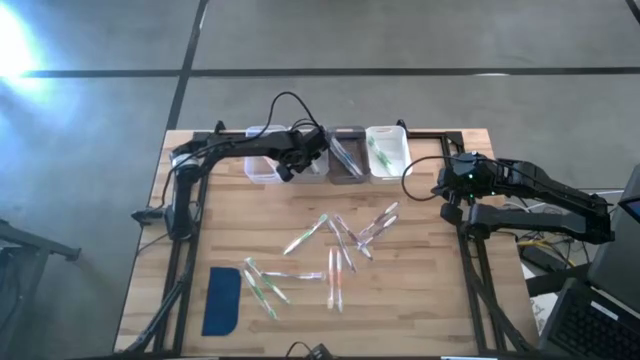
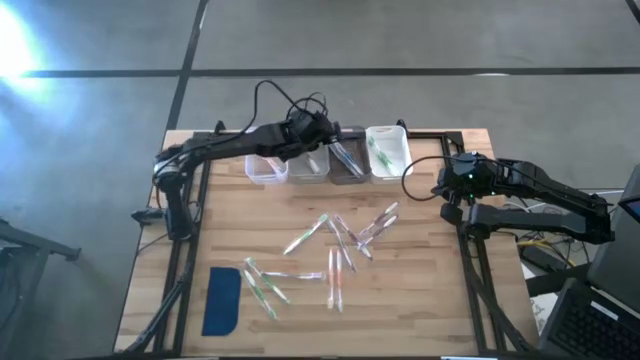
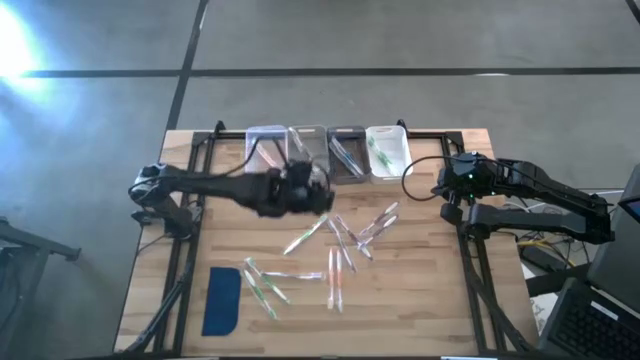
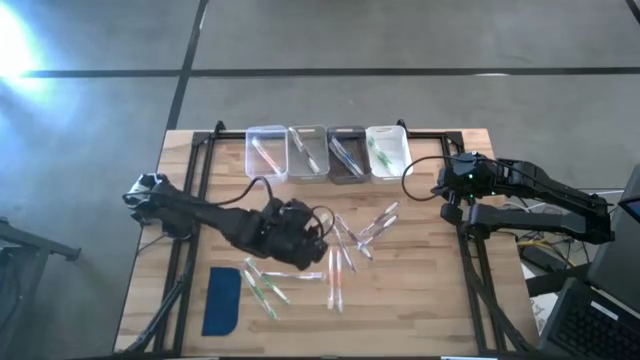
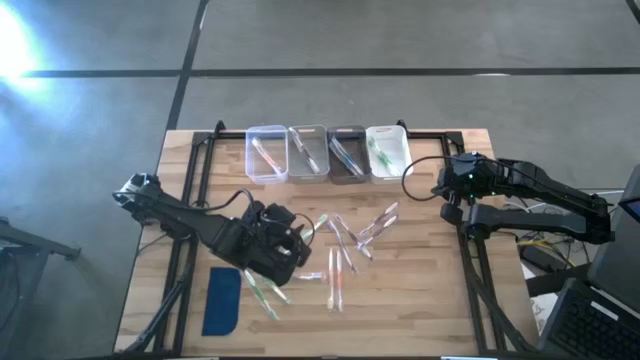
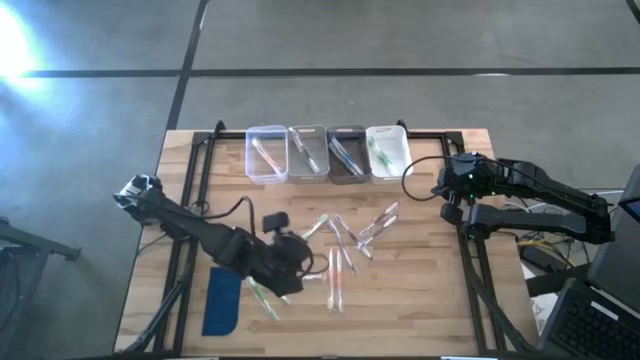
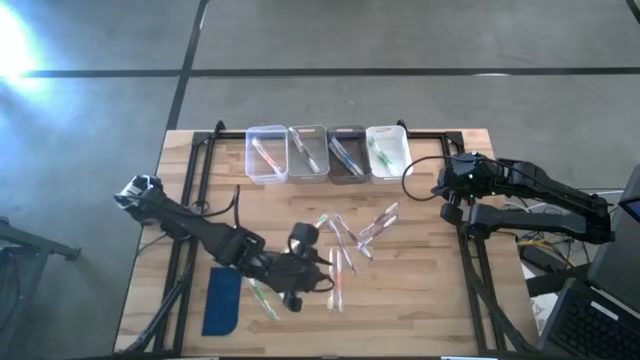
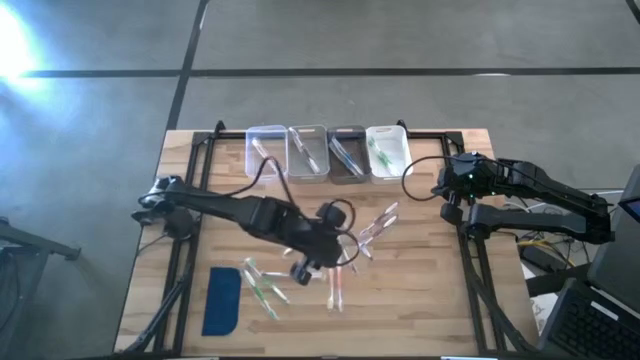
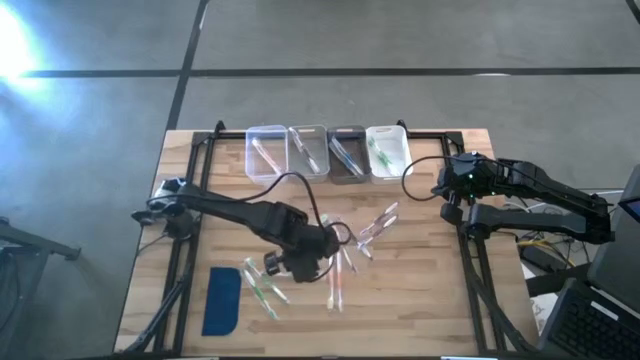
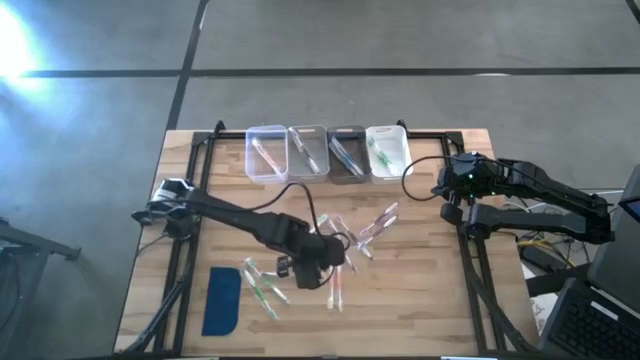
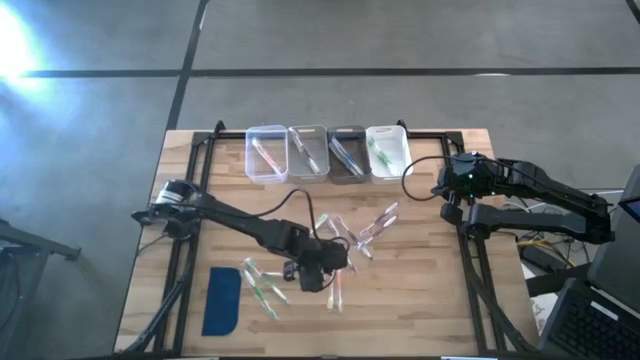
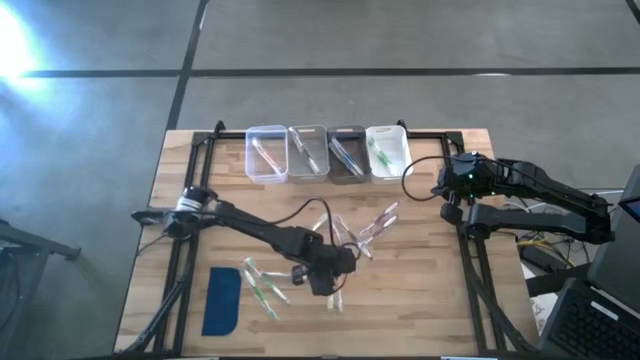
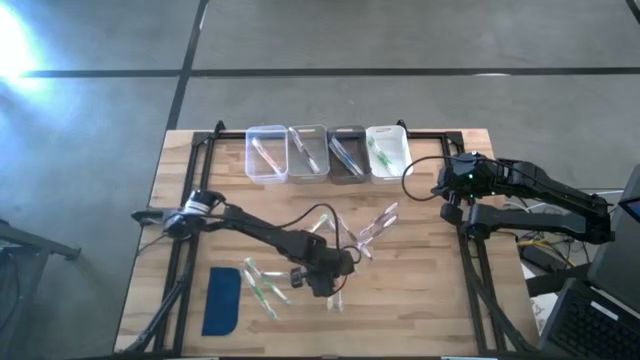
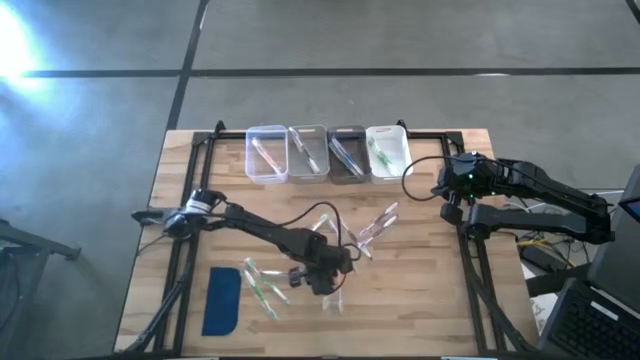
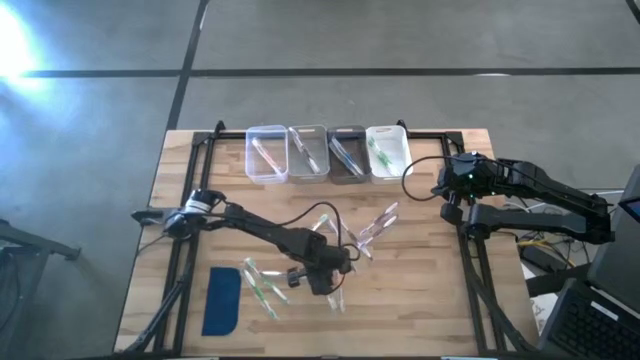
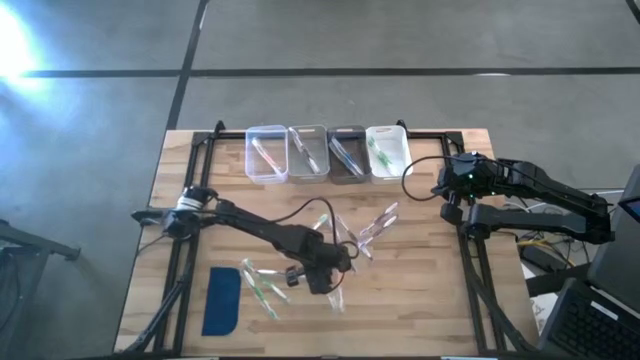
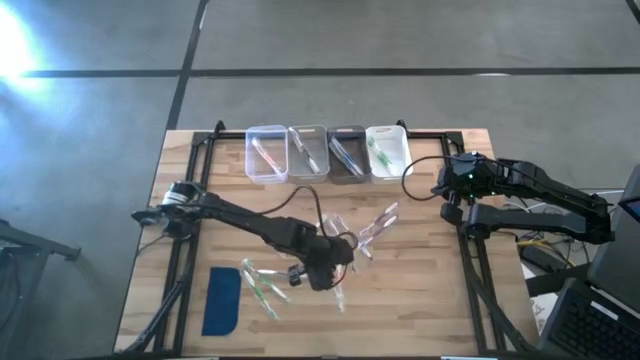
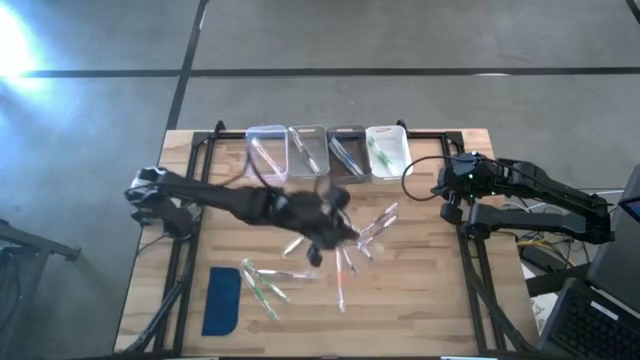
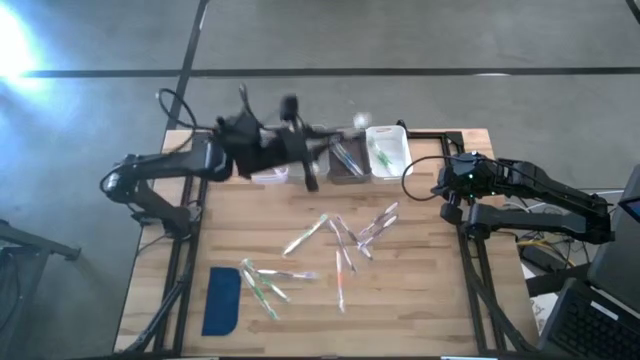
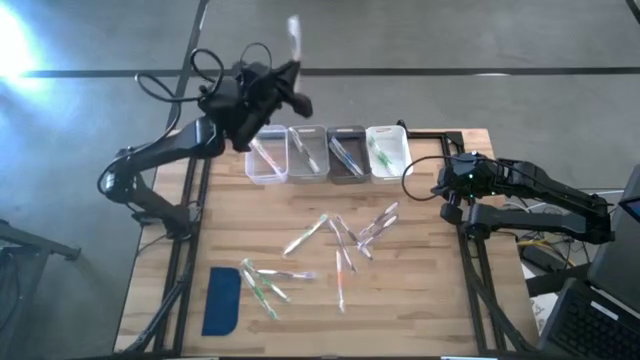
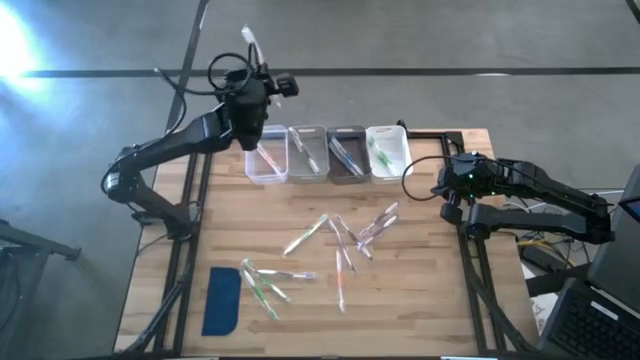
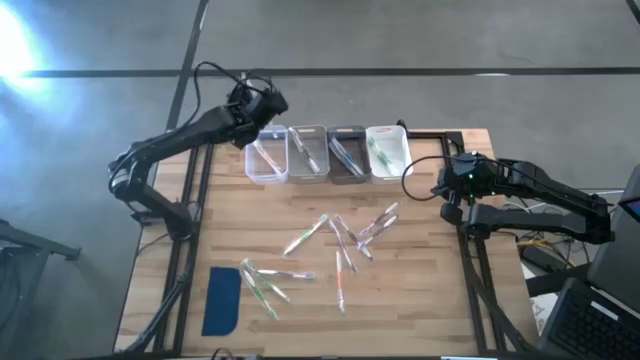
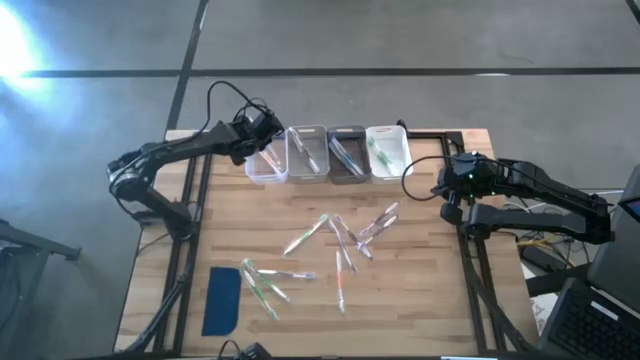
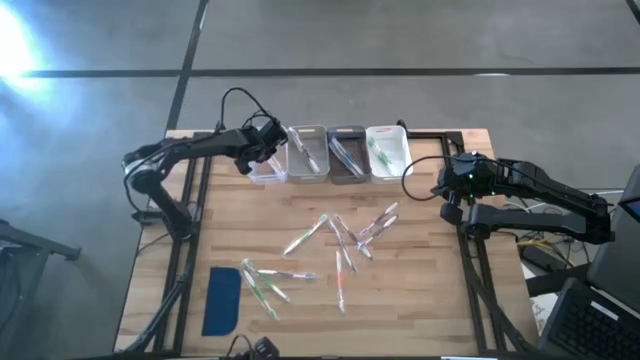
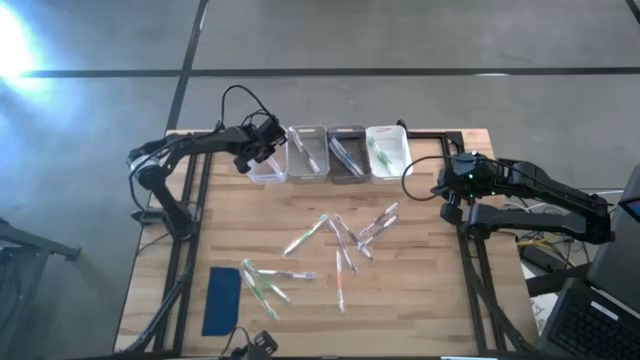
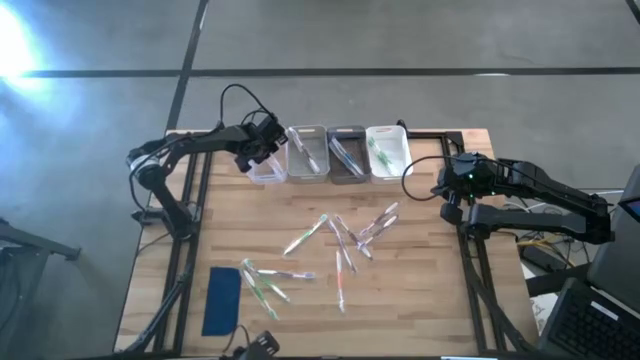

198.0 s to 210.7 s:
Task: Pick & Place Toothbrushes
Put the orange toothbrush into the white transparent bin

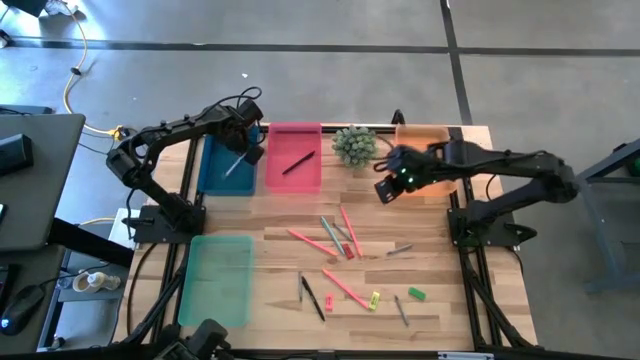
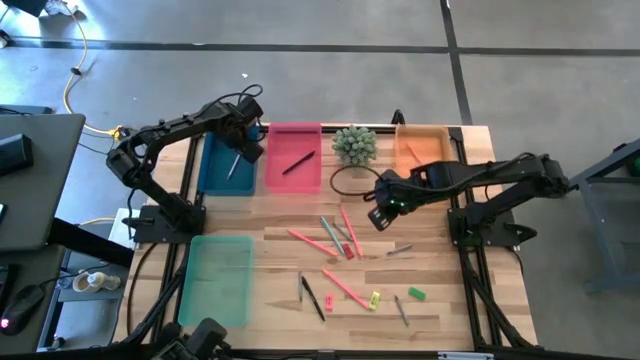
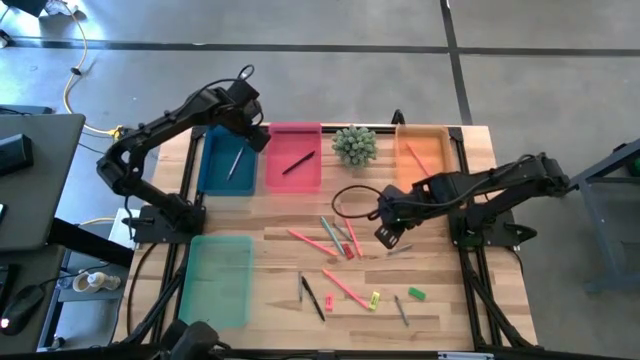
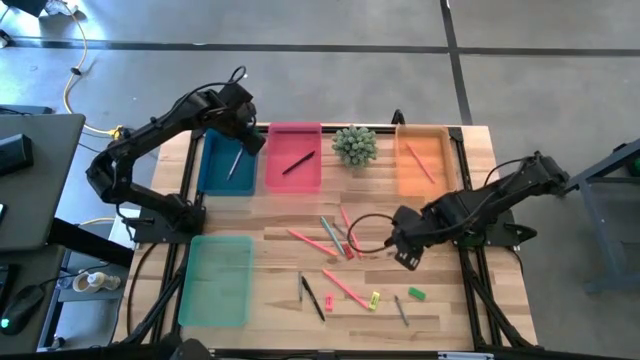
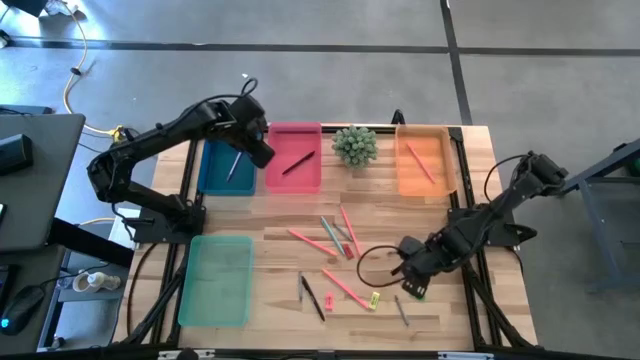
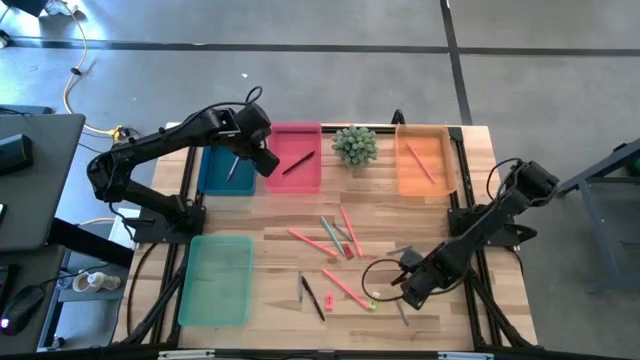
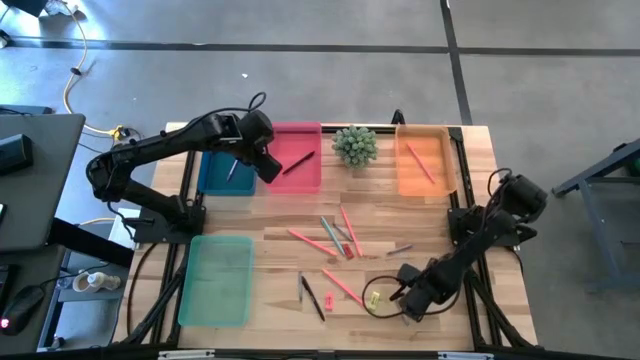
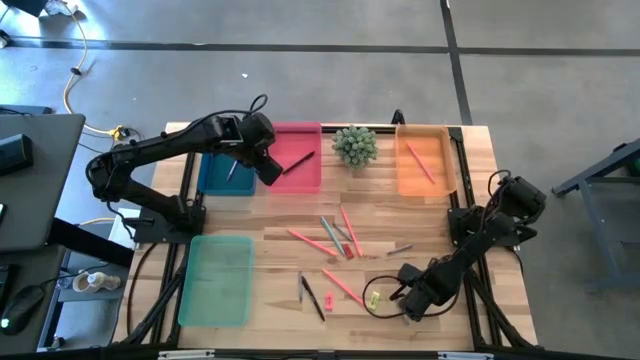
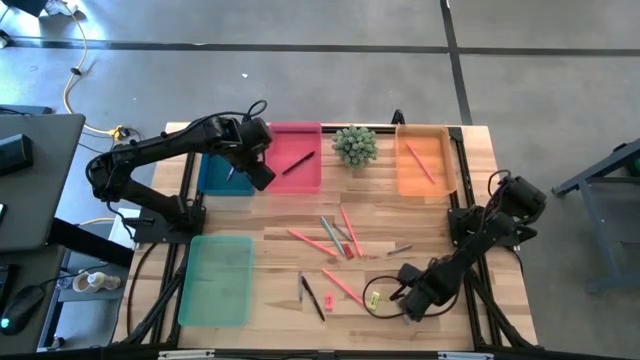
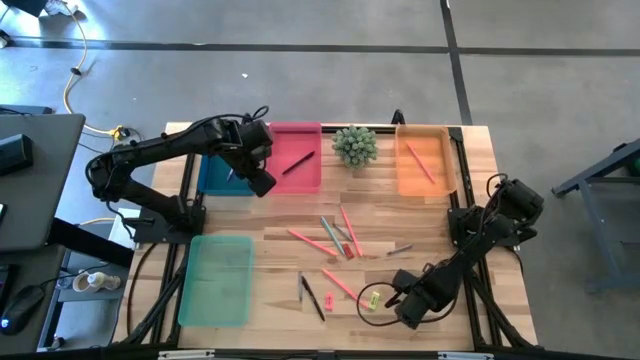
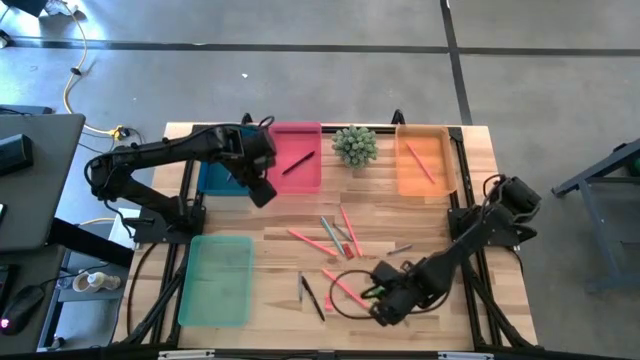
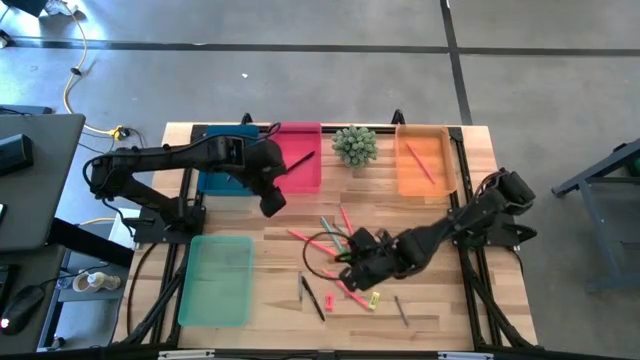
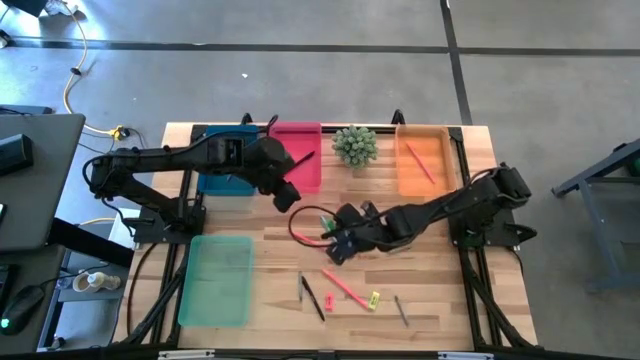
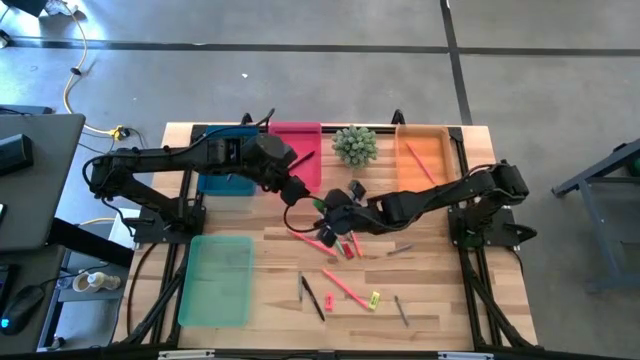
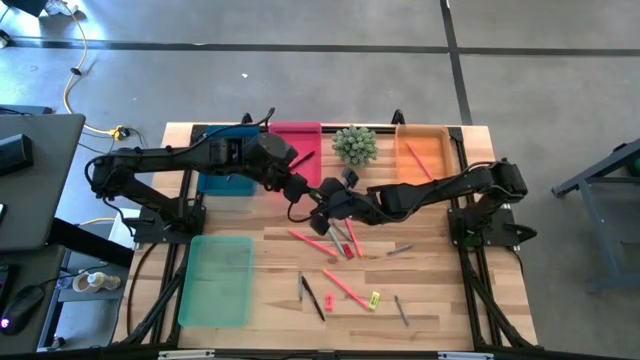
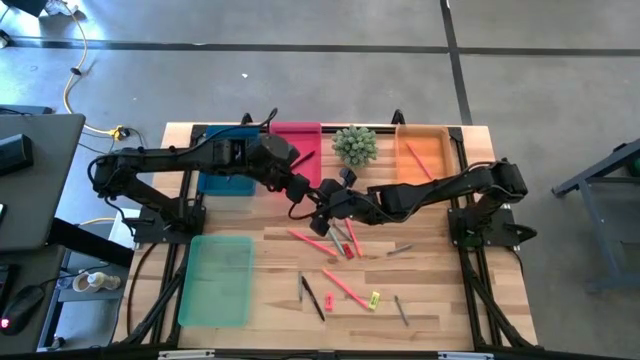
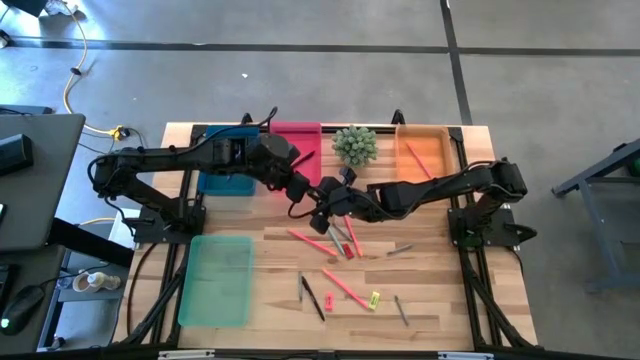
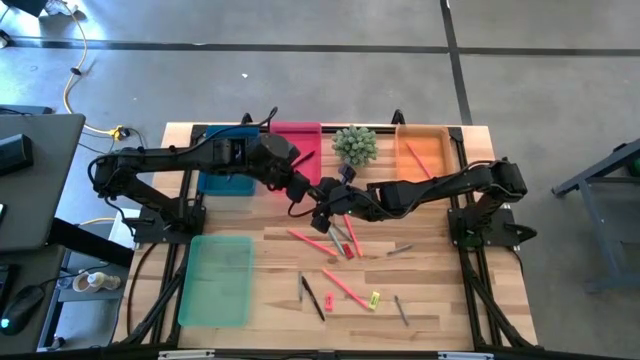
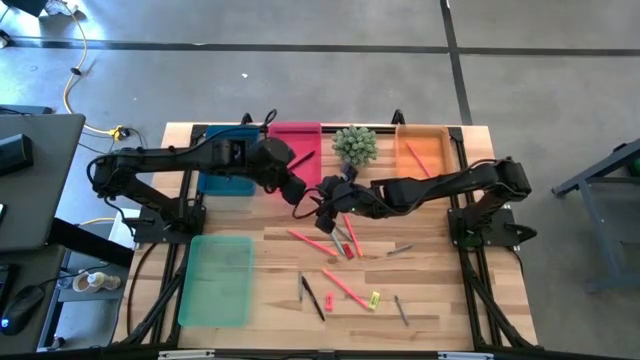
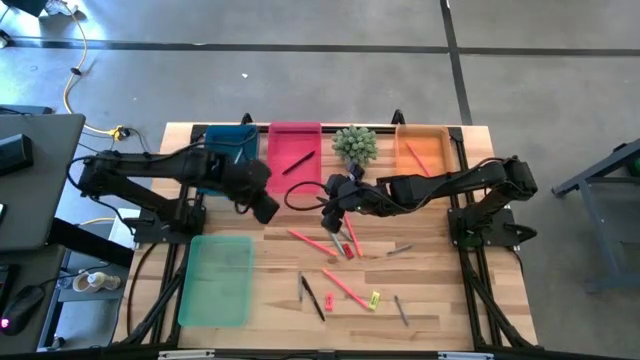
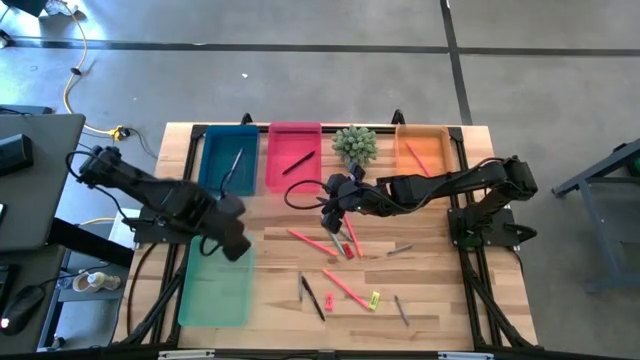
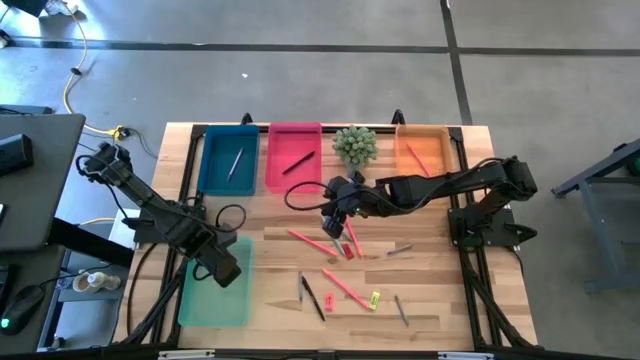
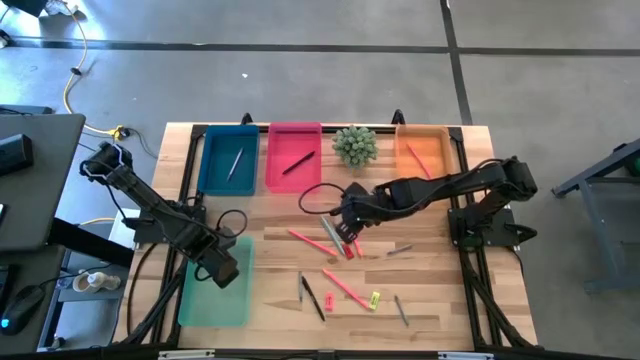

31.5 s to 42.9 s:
Task: Sort crayons/erasers/pens/pencils in bins
Put the green eraser into the green bin
